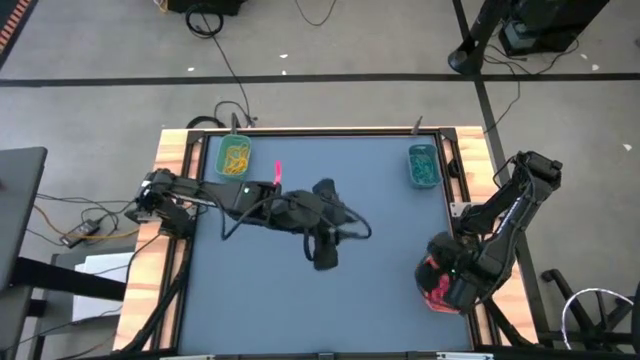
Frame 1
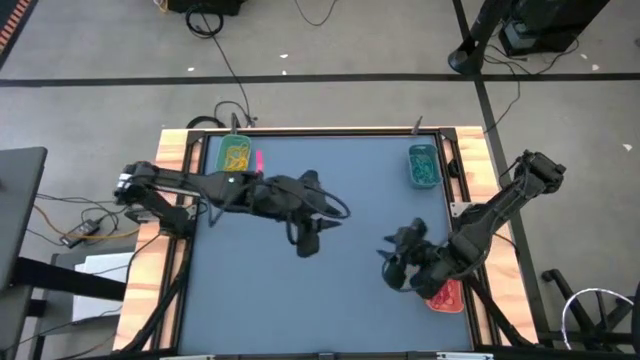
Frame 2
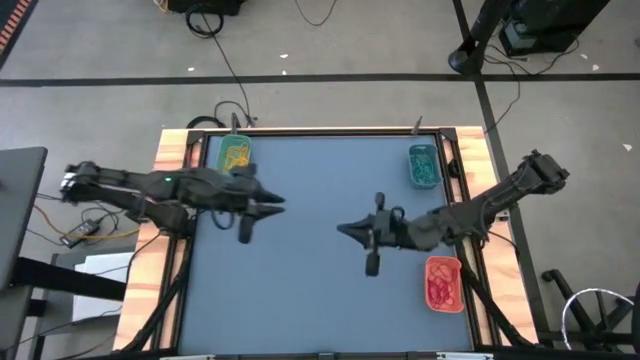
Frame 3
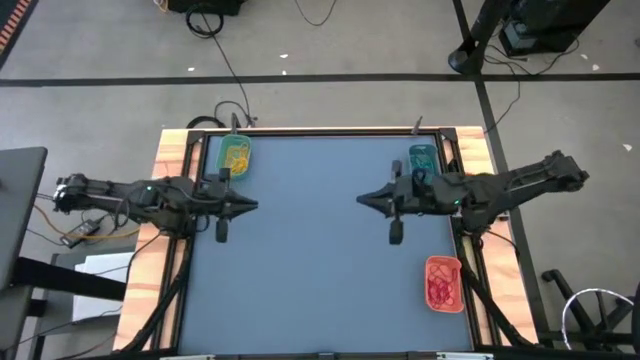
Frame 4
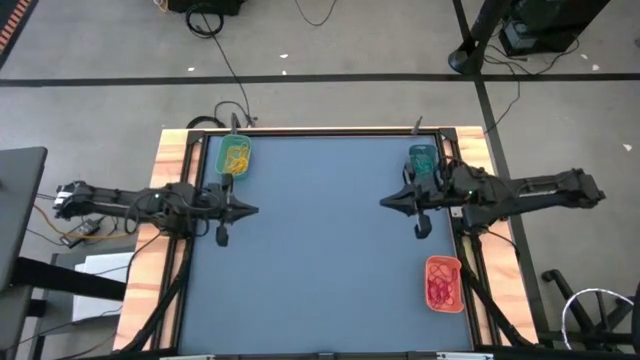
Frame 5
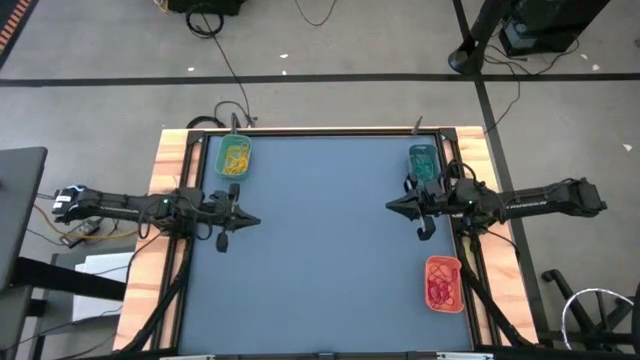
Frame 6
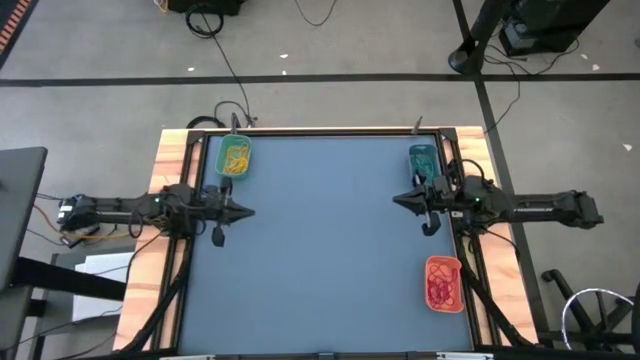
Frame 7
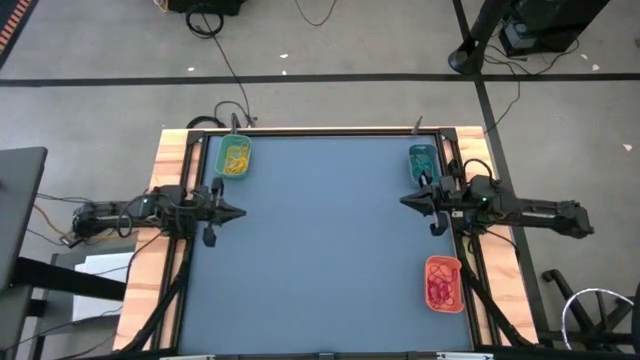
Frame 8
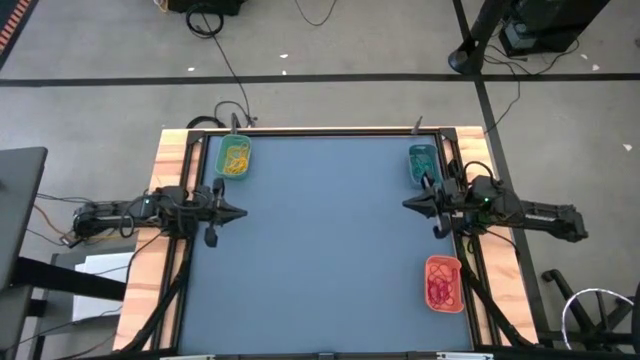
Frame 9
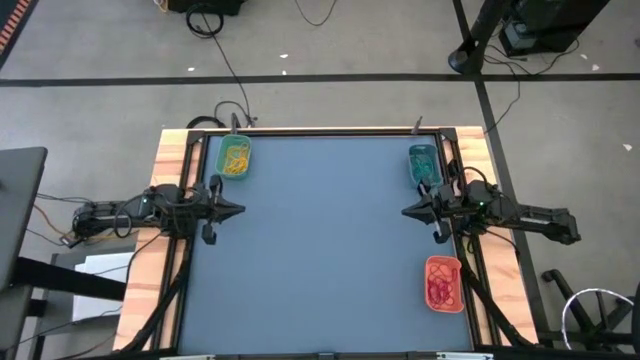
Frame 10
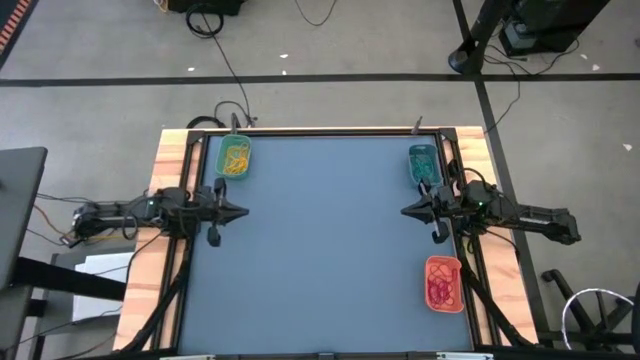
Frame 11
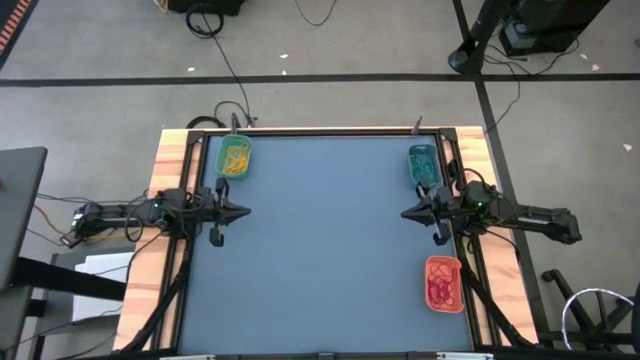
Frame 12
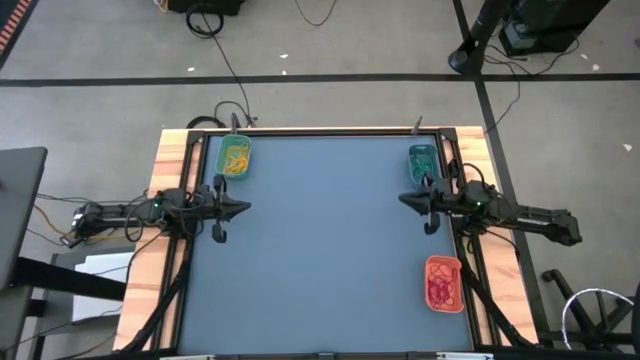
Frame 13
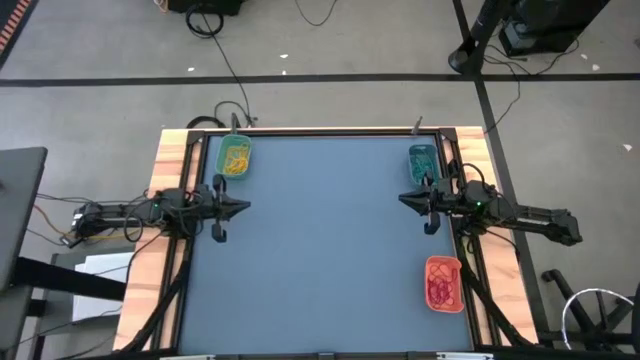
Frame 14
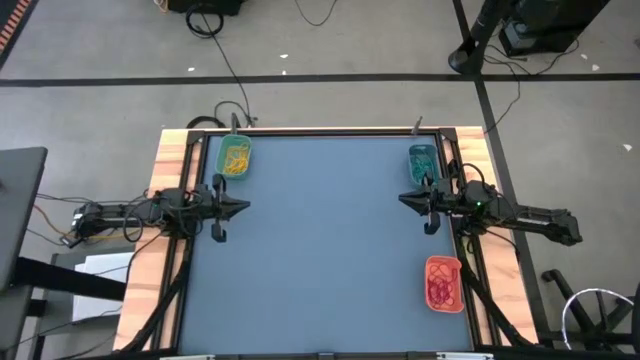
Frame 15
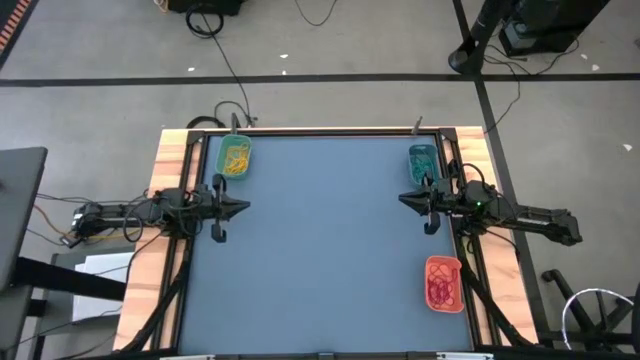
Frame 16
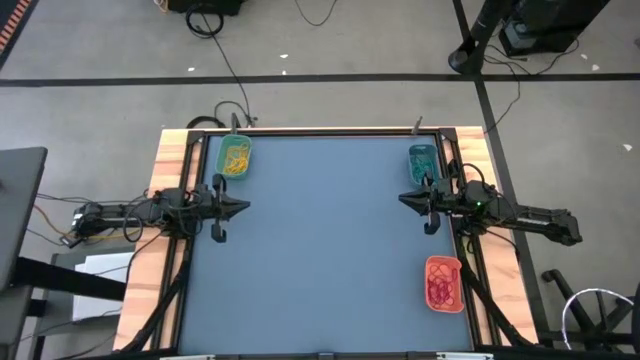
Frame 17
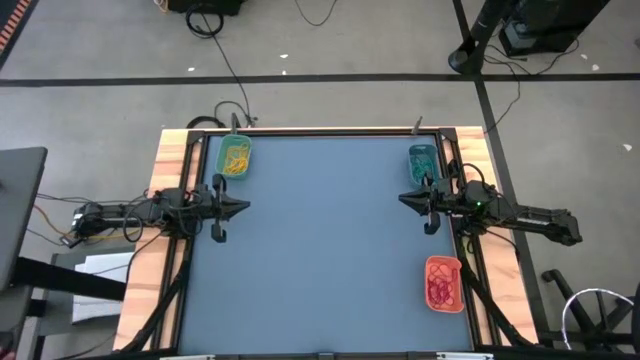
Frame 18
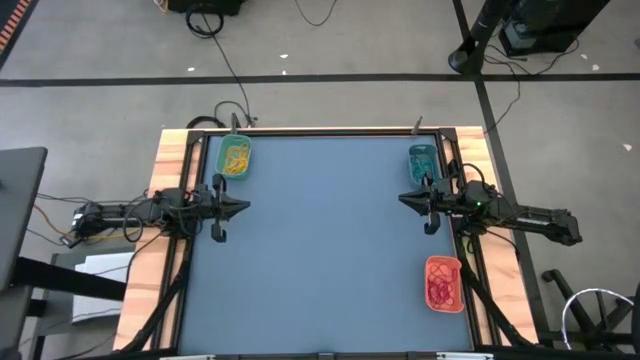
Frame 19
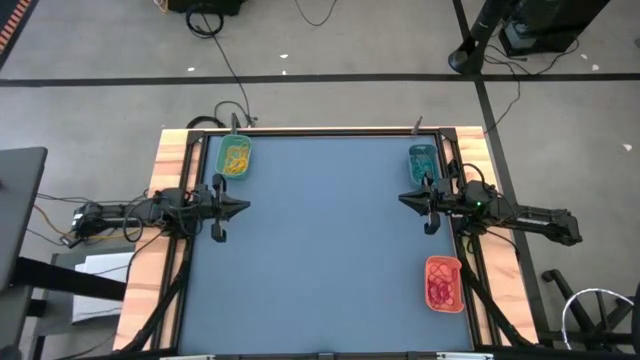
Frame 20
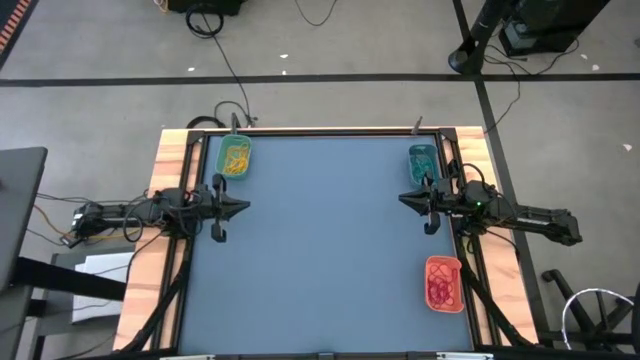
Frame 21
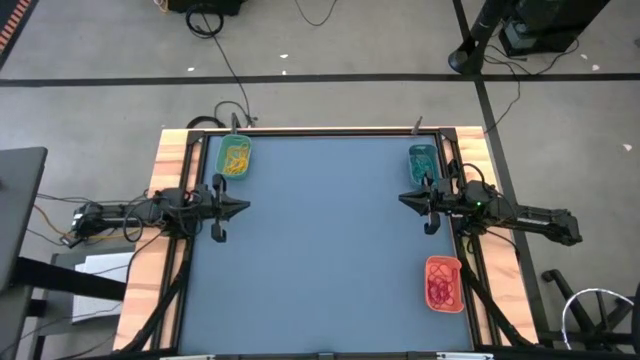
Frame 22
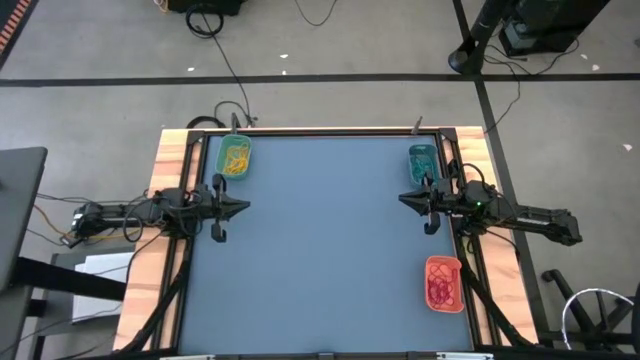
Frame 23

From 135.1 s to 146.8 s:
Task: Sort rubber bands into baskets
Return to Home Position

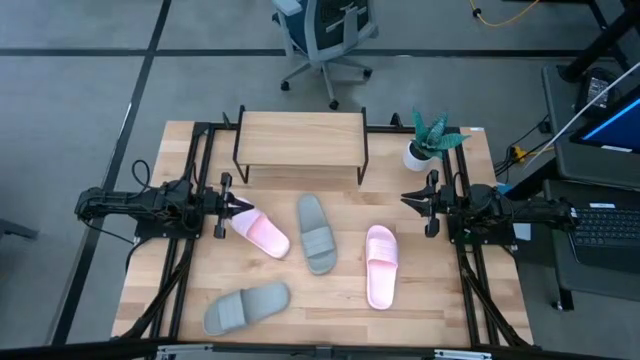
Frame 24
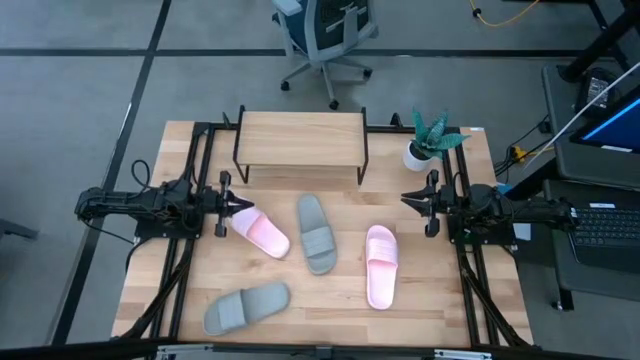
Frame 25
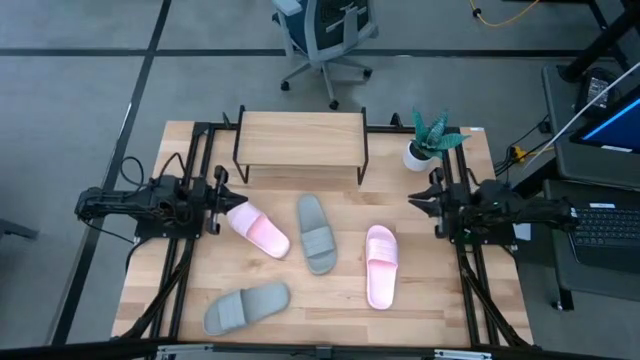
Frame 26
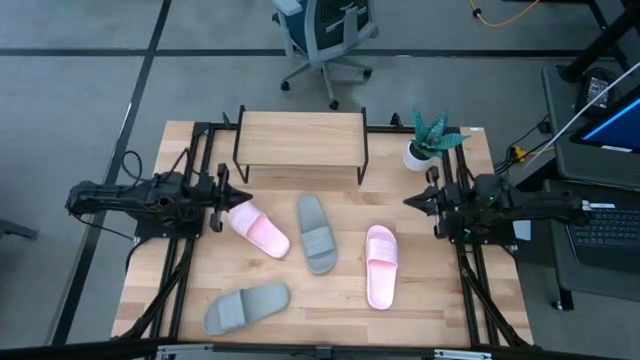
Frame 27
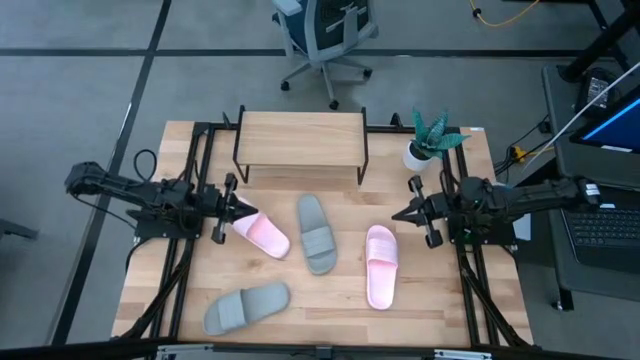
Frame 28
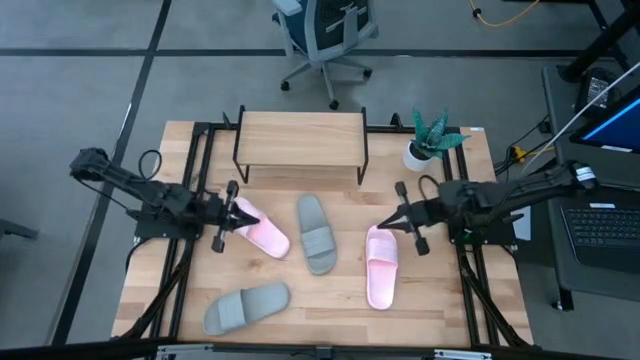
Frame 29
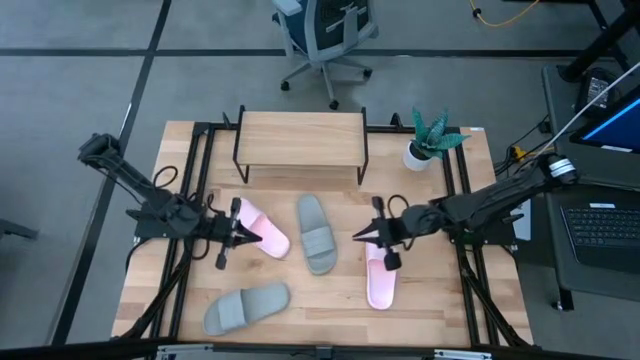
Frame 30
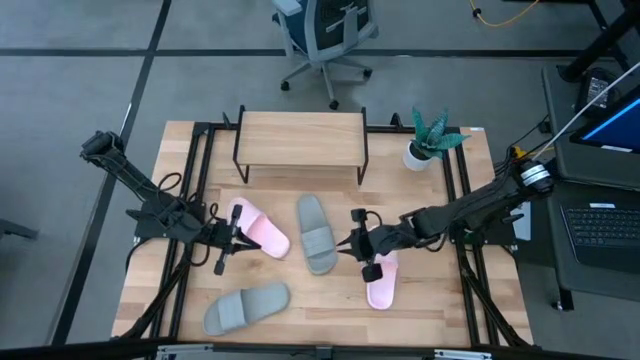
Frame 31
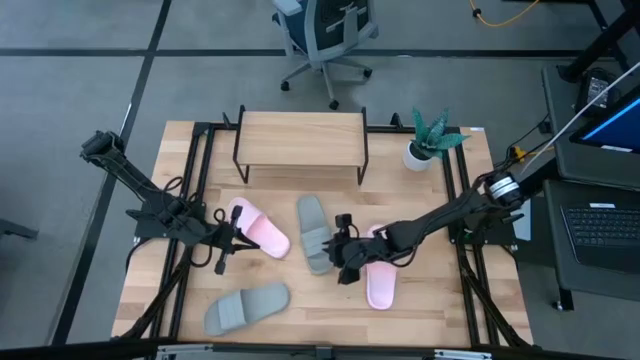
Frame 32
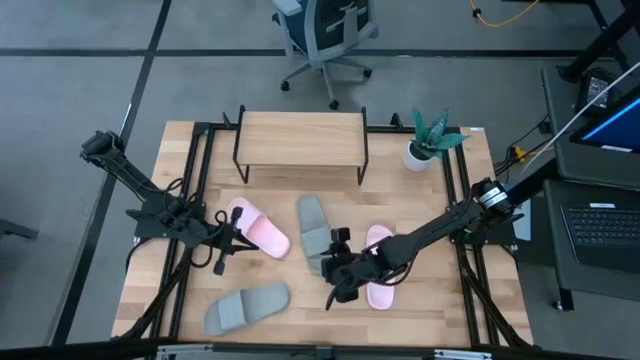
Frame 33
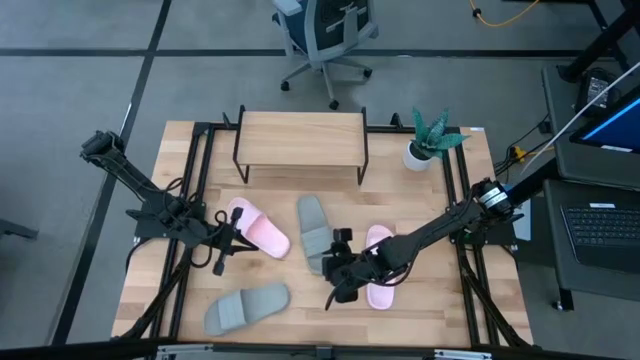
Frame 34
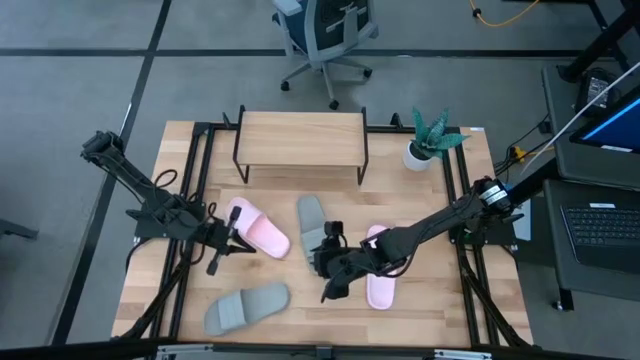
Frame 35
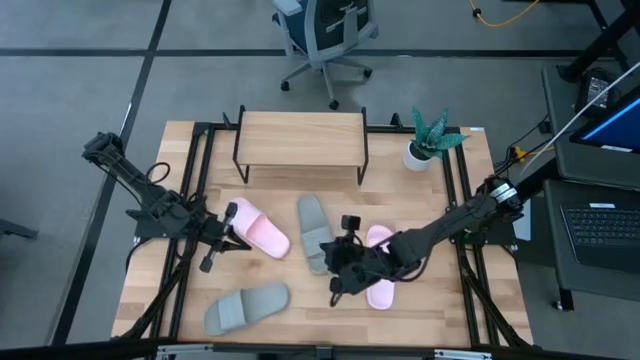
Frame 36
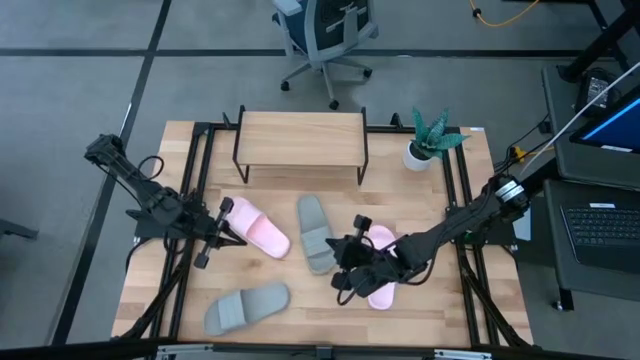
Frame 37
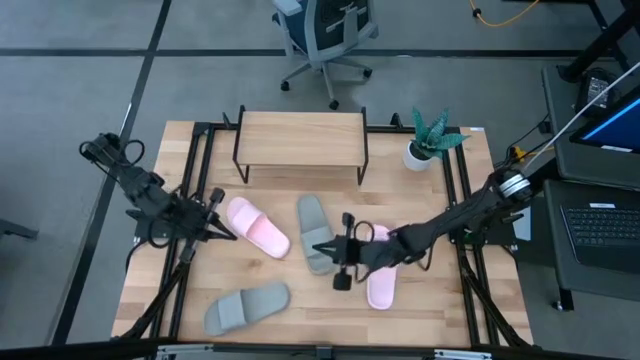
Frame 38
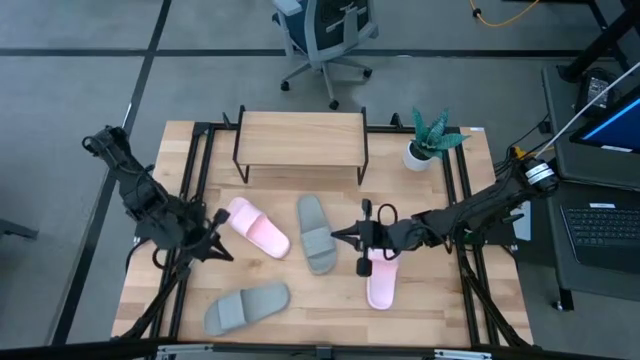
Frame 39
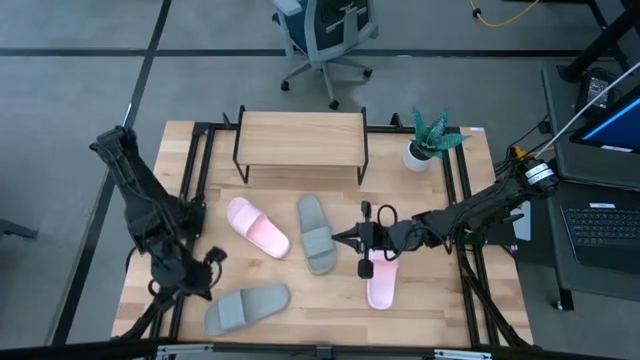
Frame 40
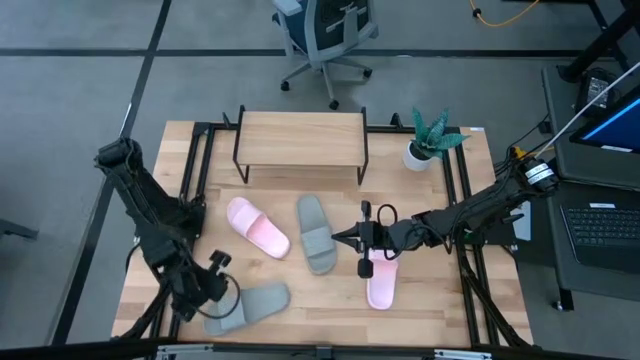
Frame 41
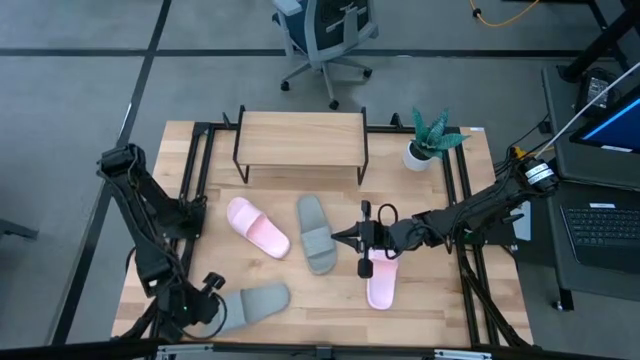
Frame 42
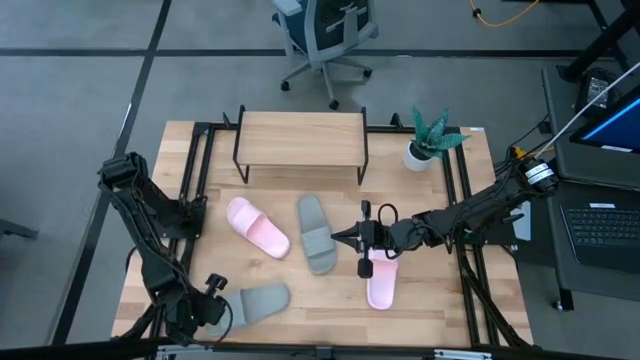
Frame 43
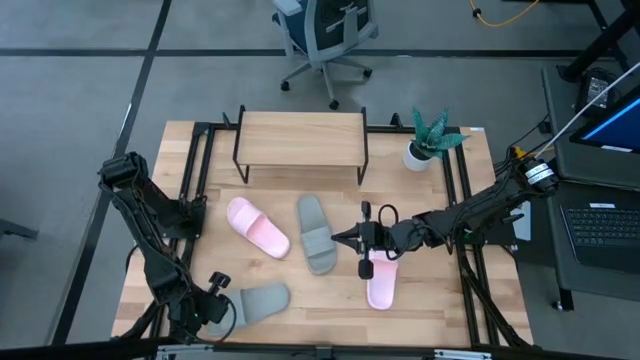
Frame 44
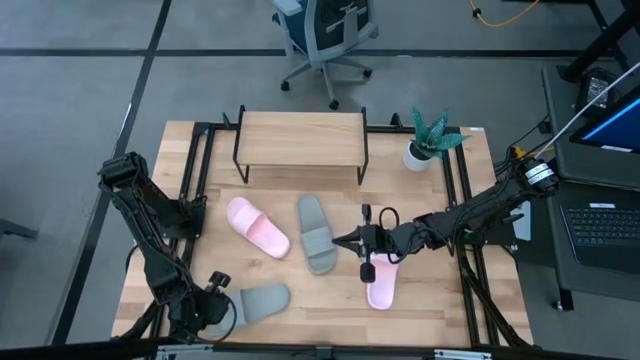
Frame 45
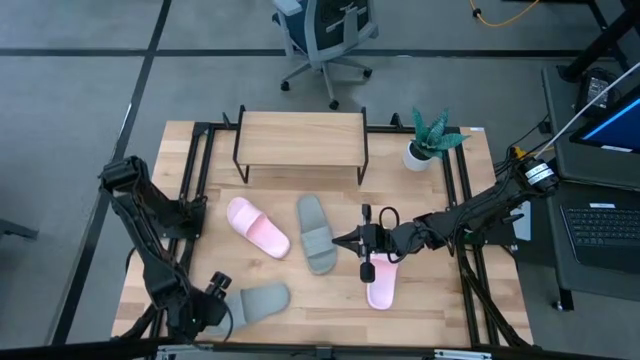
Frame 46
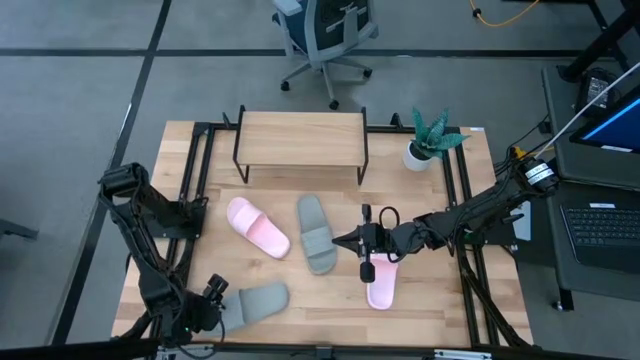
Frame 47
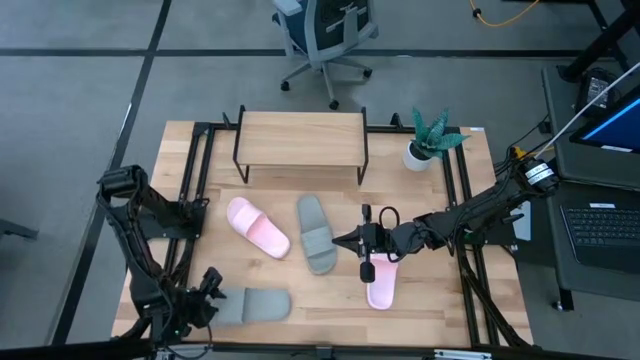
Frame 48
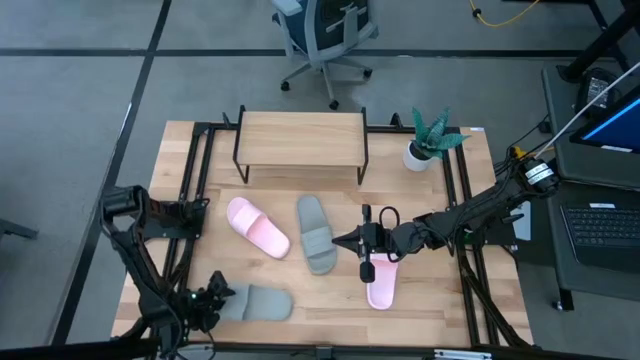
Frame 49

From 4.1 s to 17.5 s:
Task: Pick and place slides into the shelf
Put the bottom gray slipper on the shelf
